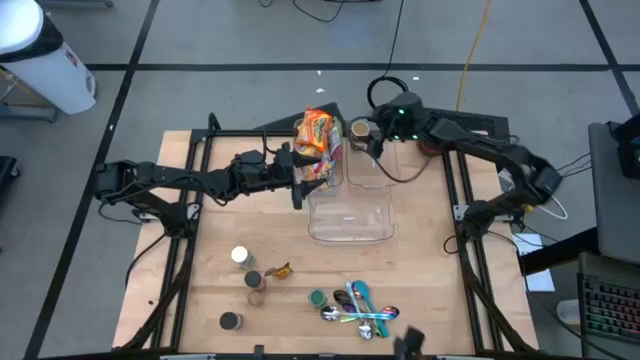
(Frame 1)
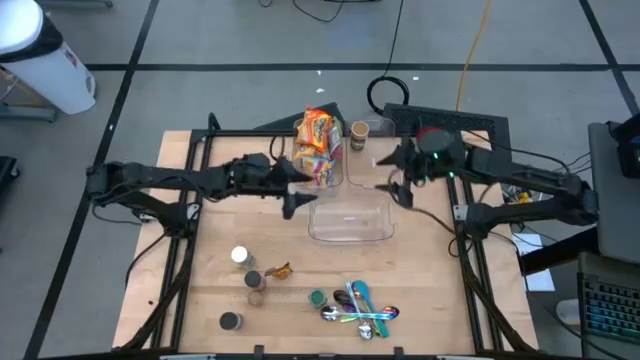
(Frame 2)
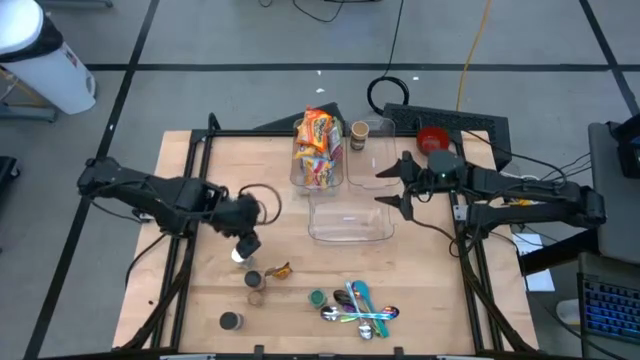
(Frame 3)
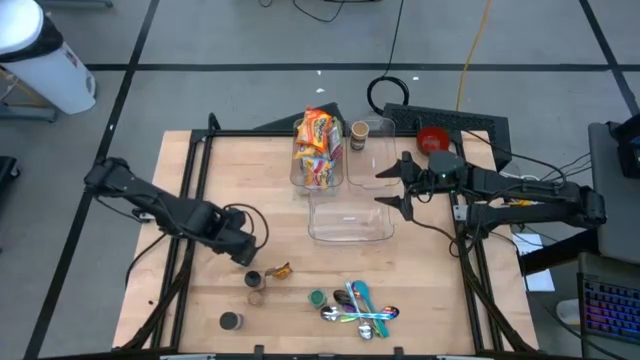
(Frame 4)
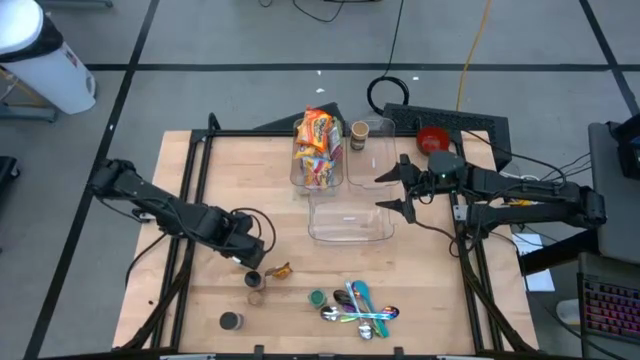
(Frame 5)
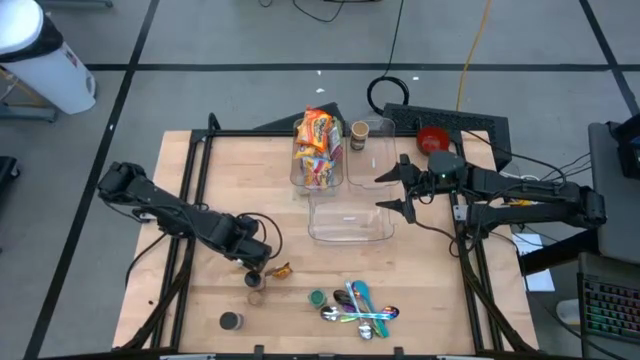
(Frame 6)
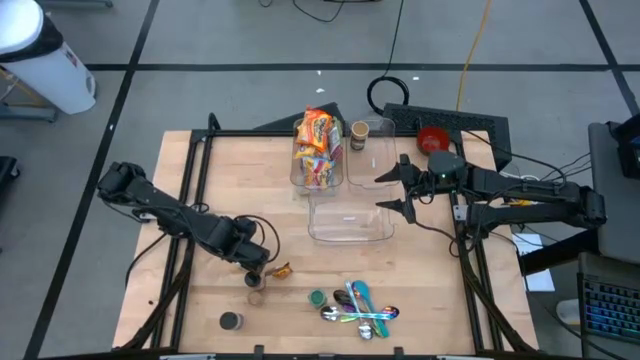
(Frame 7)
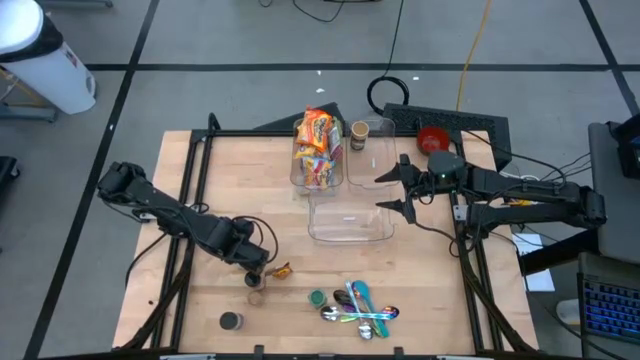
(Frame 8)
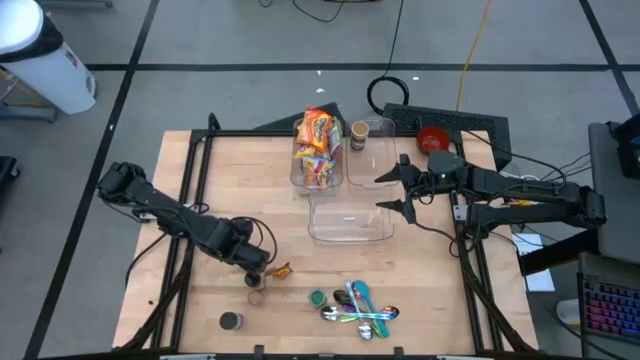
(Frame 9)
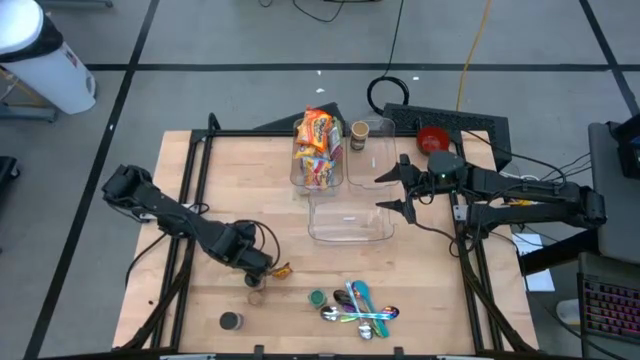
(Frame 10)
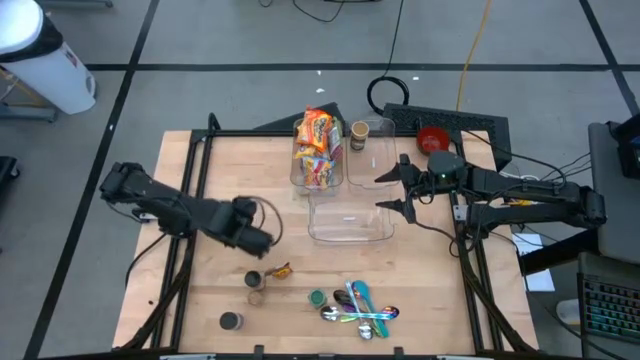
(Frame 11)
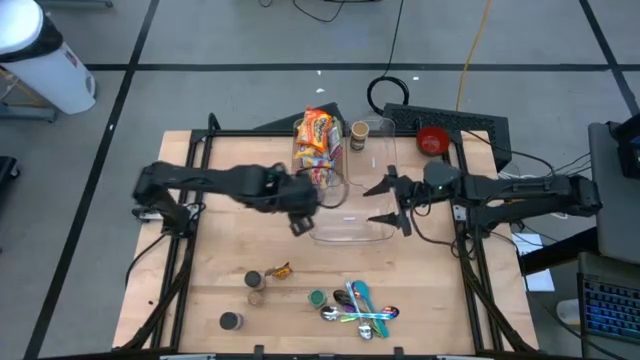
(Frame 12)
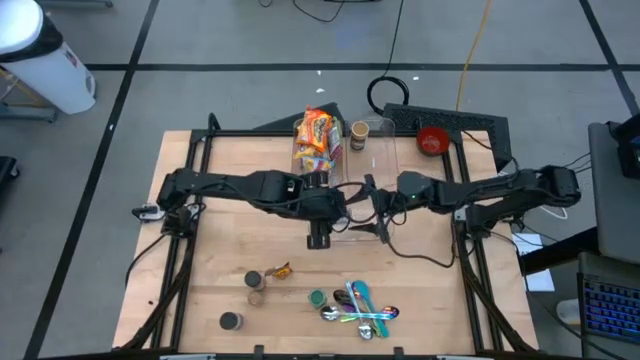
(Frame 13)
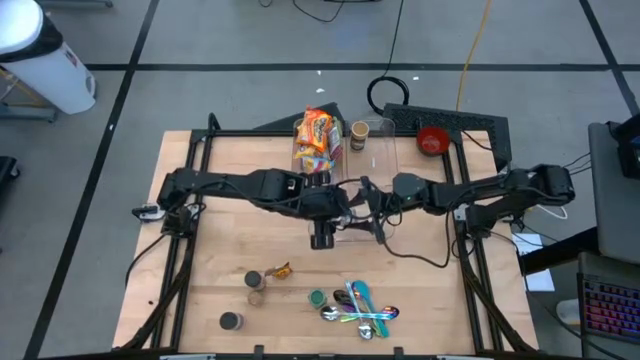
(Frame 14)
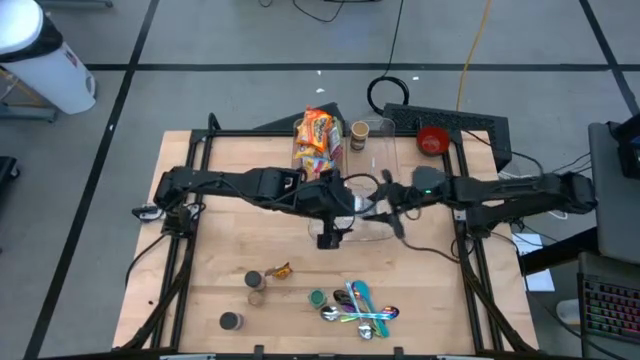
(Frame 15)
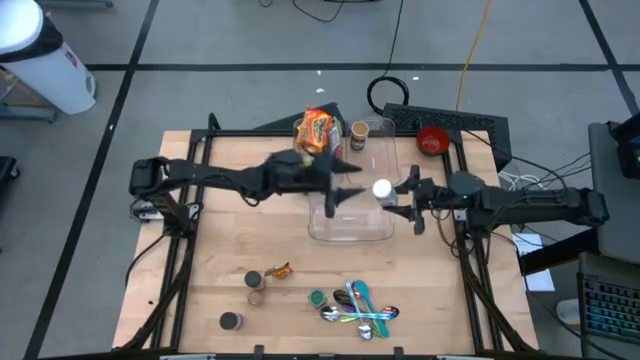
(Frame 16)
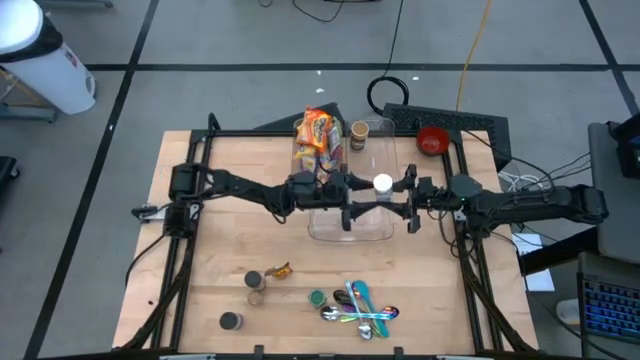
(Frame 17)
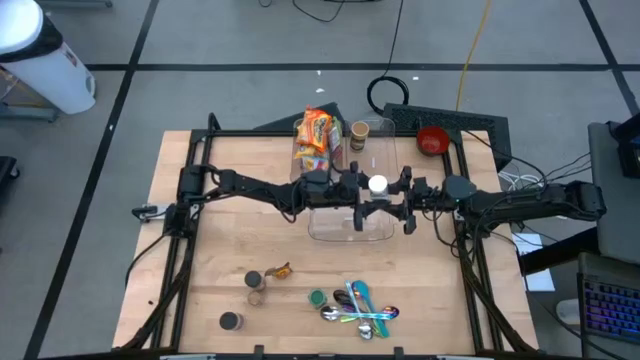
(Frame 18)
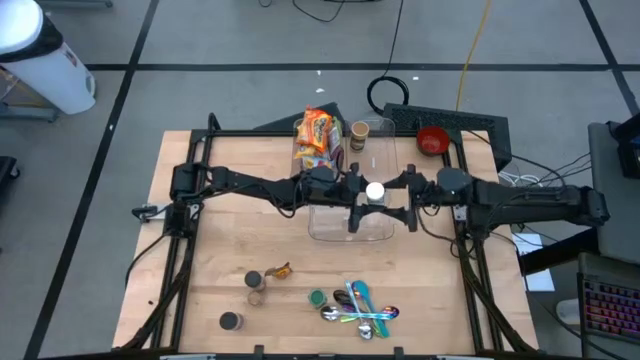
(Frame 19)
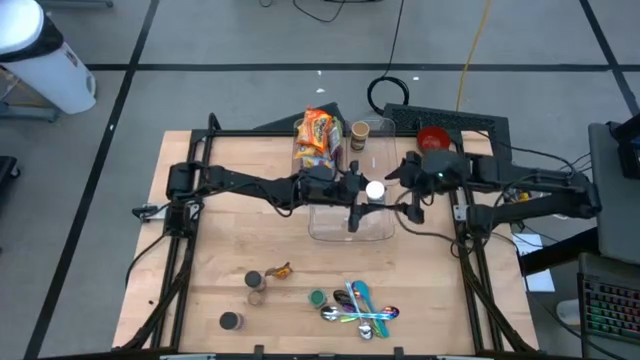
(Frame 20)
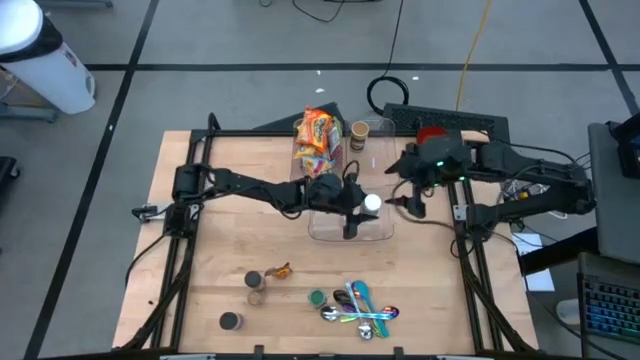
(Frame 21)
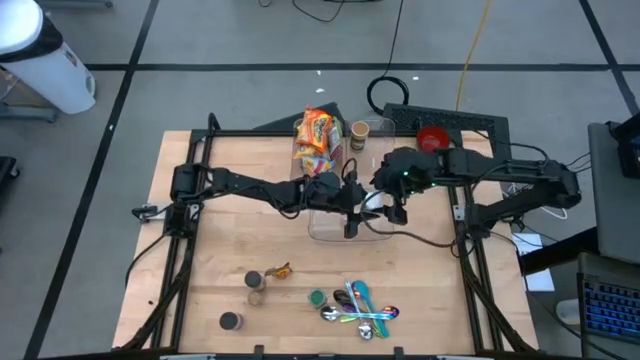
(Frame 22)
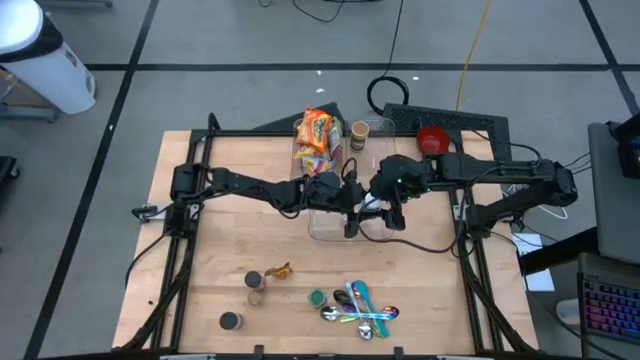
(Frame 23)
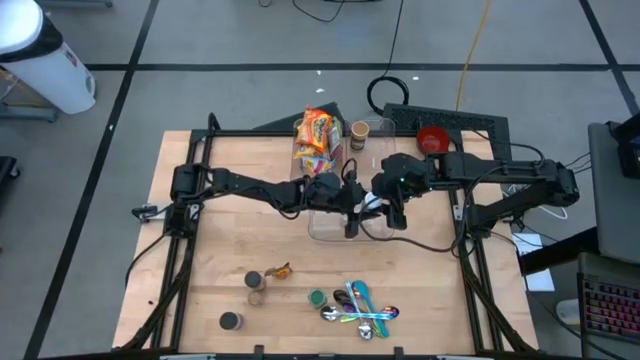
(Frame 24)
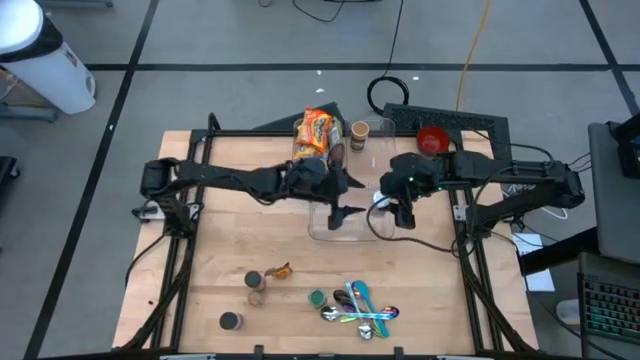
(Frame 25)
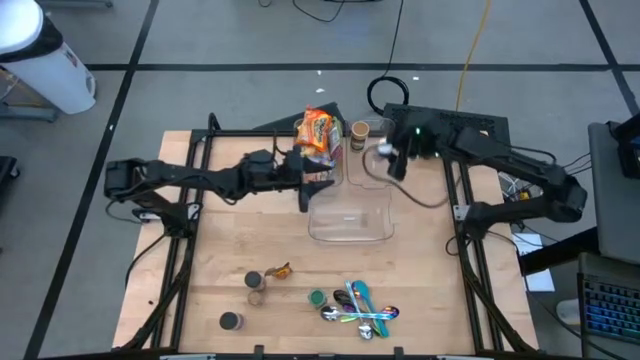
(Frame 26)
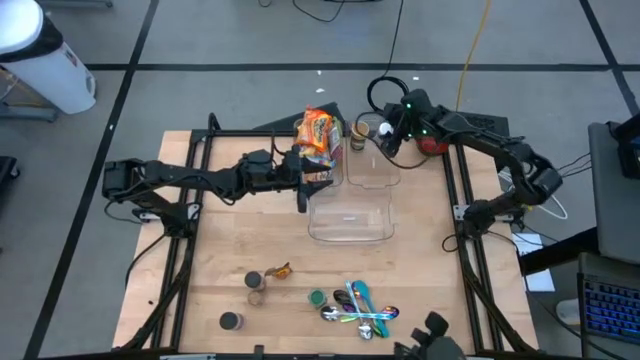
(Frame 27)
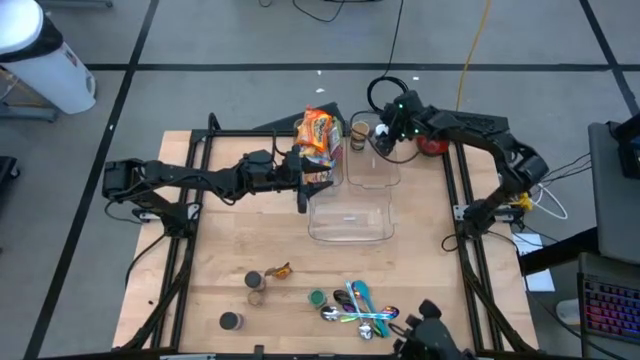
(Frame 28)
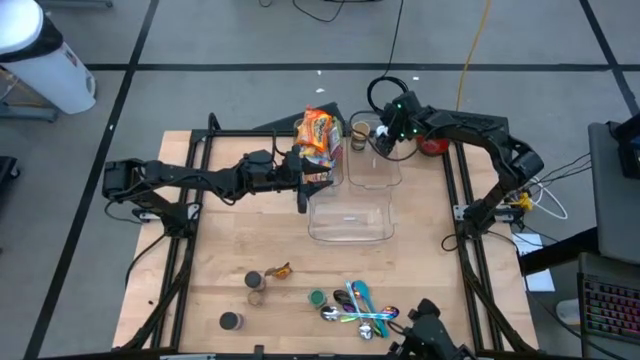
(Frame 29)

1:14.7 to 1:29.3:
Task: Pick & Place Food Item
Put the white seasoning bottle into the right transparent bin

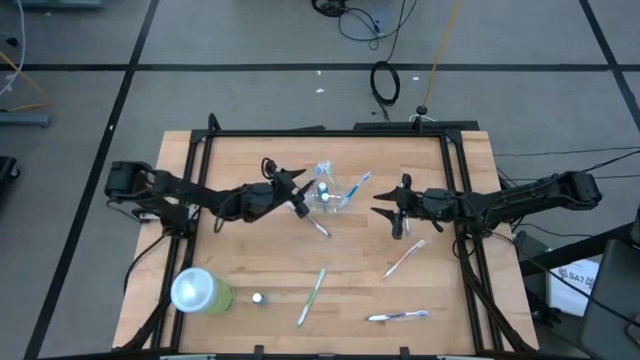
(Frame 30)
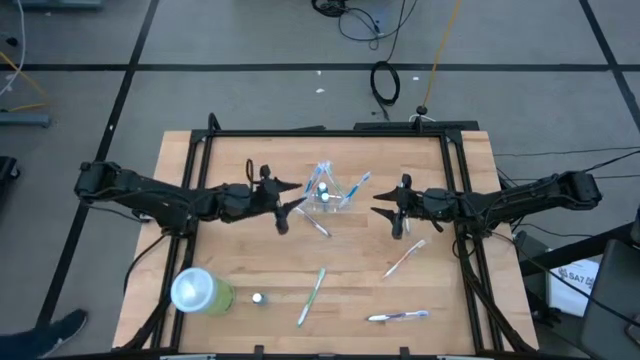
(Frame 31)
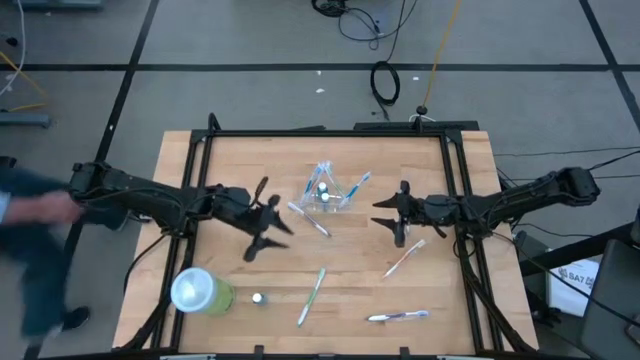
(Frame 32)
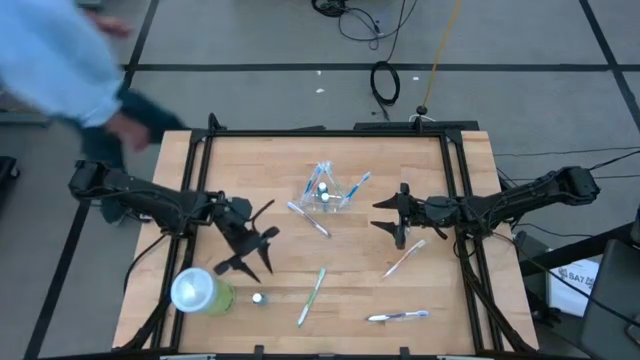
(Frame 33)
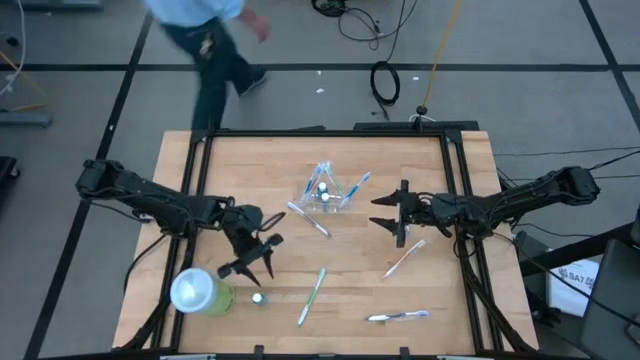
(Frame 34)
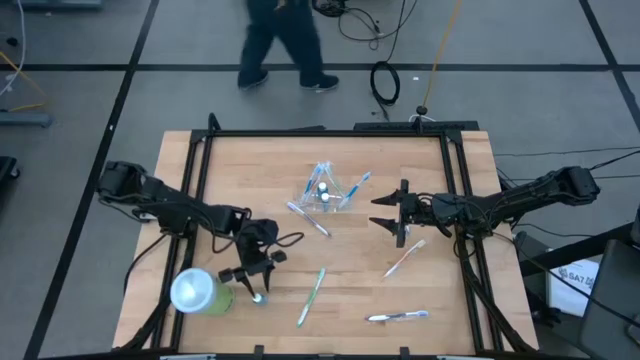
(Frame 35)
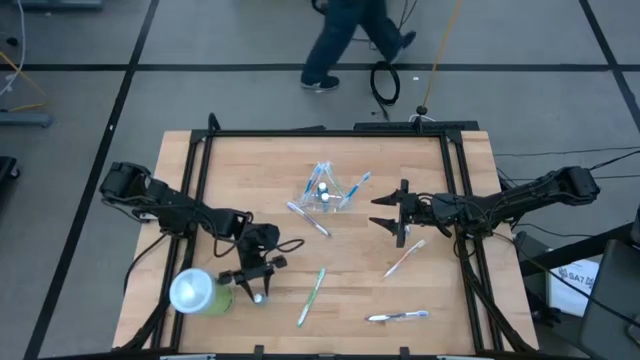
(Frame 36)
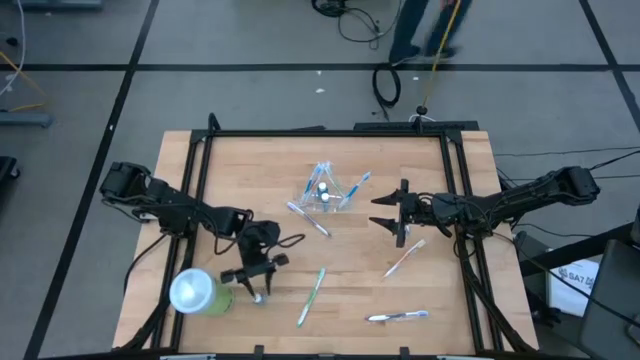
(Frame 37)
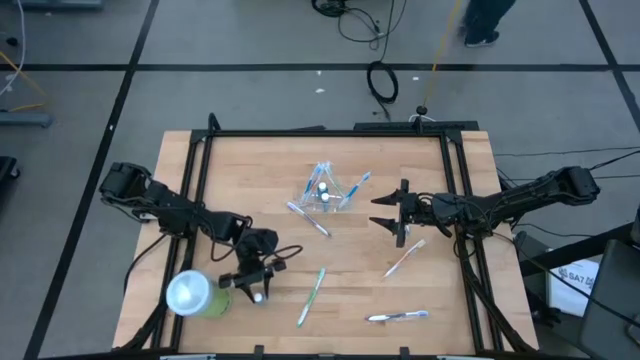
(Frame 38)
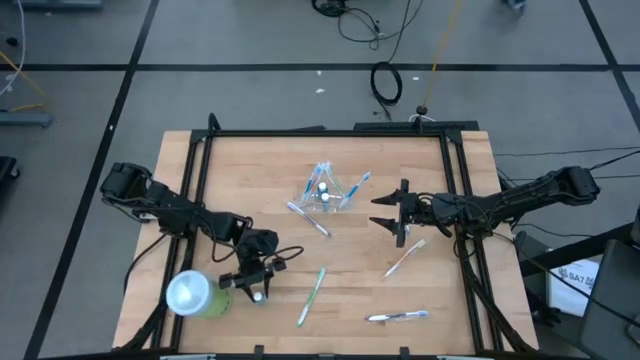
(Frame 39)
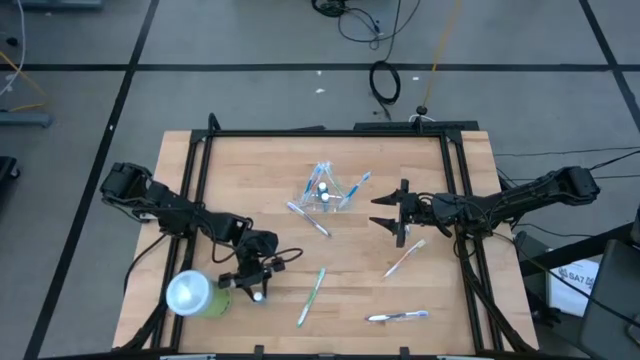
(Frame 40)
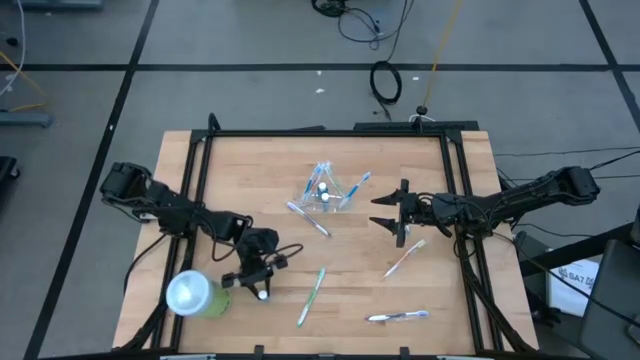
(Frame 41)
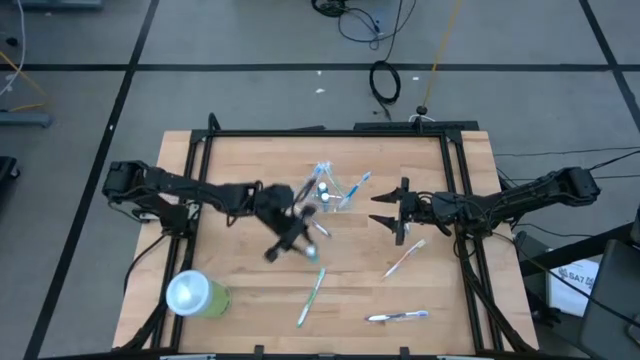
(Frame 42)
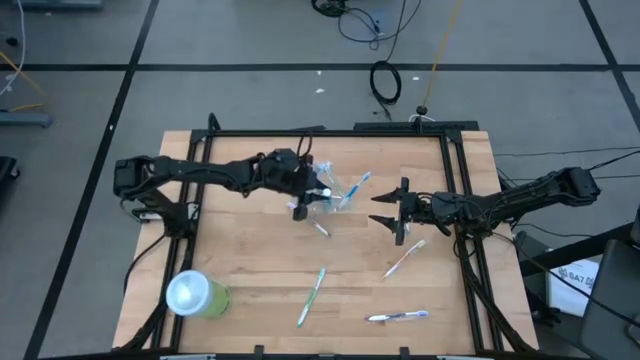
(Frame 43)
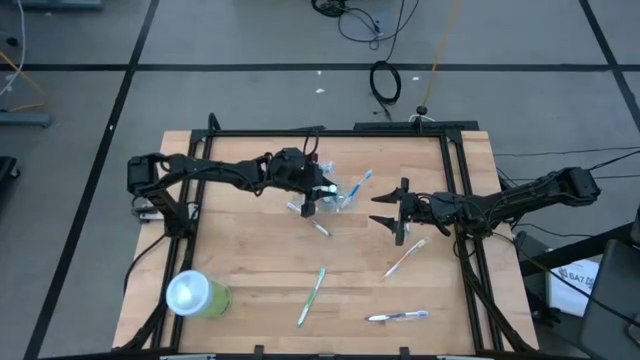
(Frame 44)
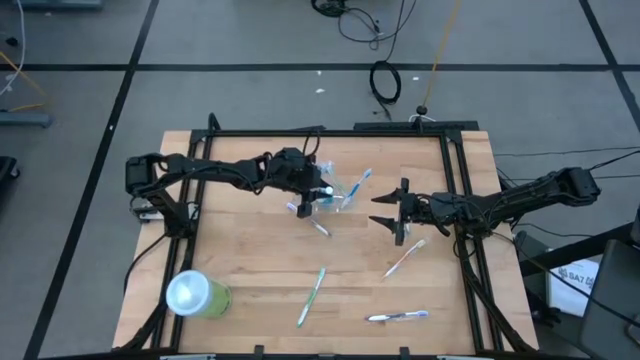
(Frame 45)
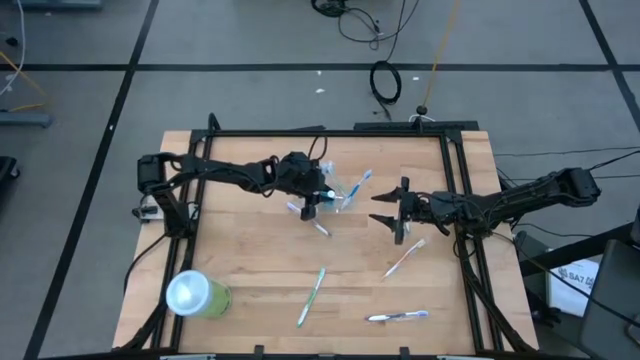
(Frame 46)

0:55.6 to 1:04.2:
Task: Pick & Place toothbrushing station
Put the mouthwash into the transparent organizer
